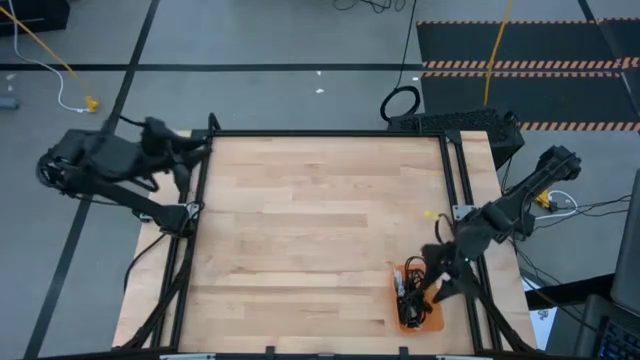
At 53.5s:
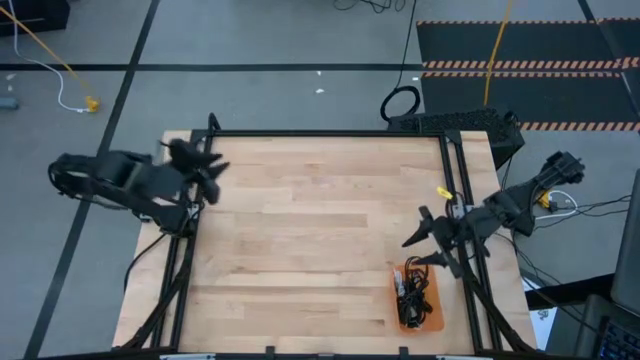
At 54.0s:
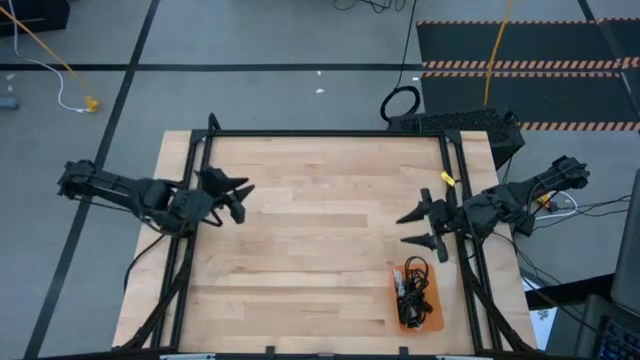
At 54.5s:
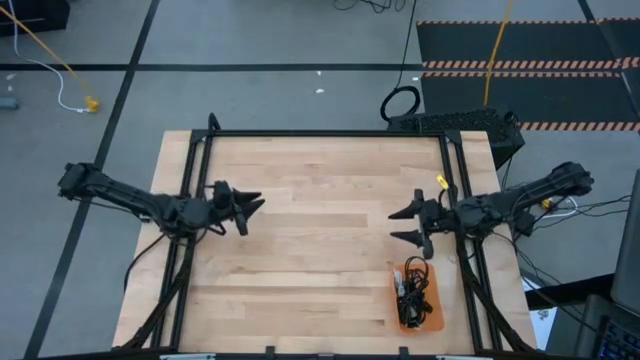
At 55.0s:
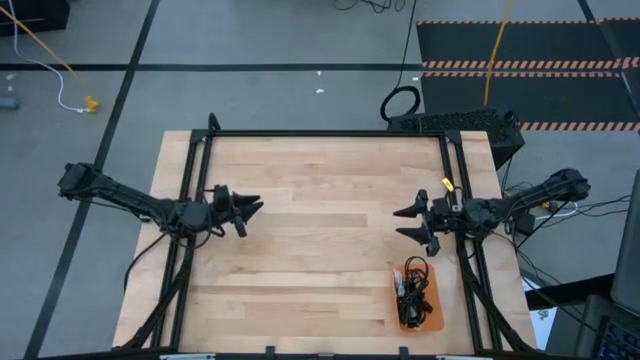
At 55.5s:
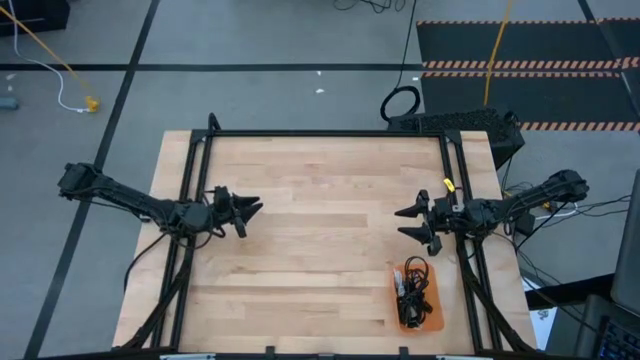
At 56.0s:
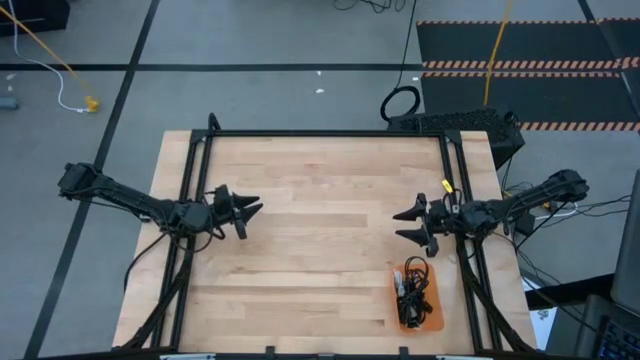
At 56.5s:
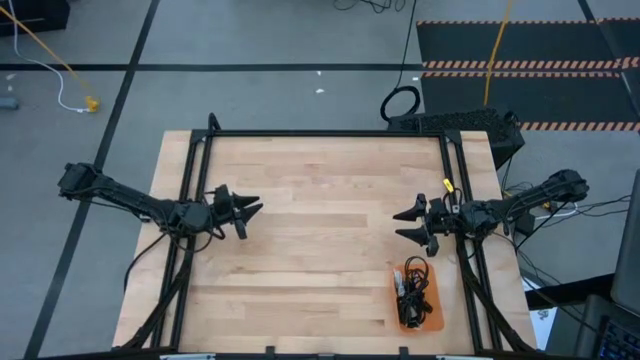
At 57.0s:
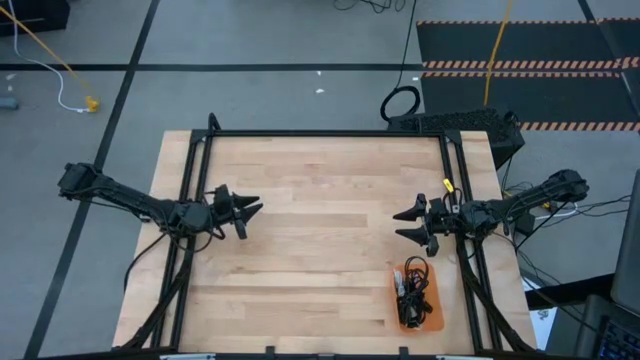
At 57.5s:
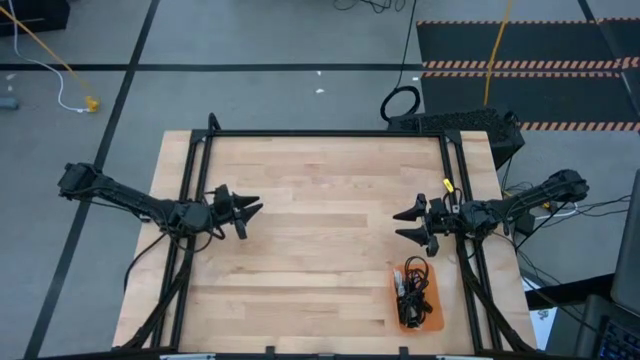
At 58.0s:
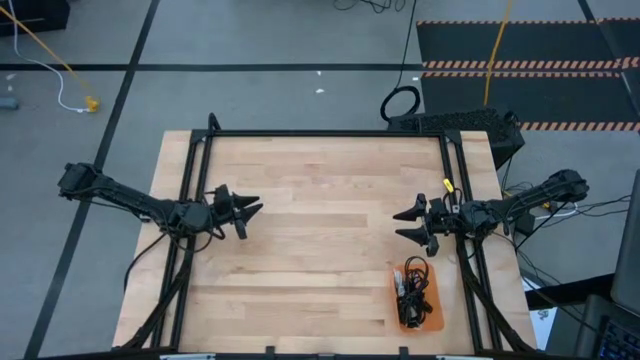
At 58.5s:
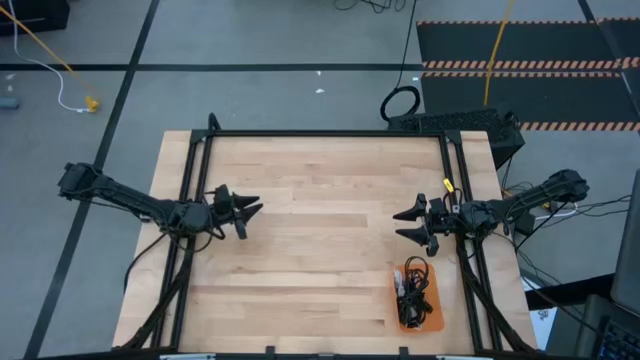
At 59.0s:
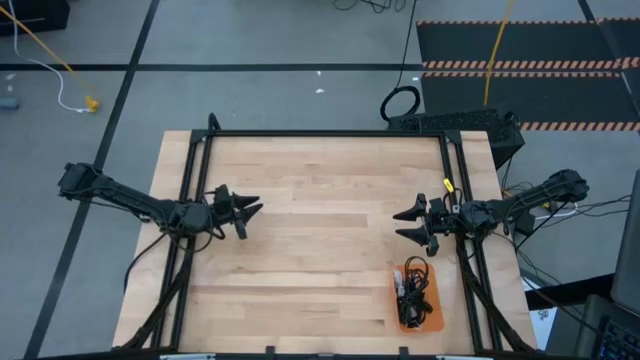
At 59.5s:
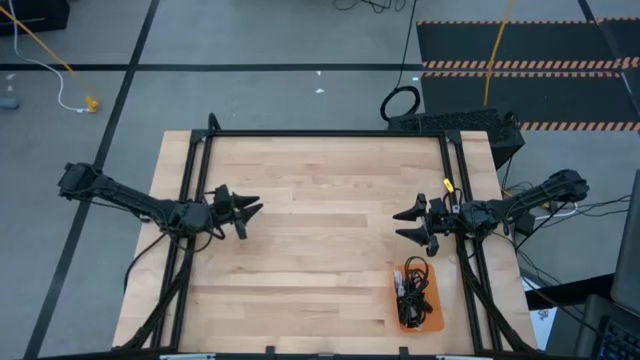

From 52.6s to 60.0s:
Task: Pick and place USB-C Cables
Return to home position

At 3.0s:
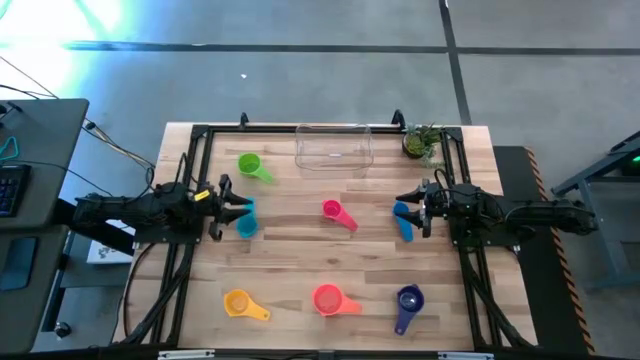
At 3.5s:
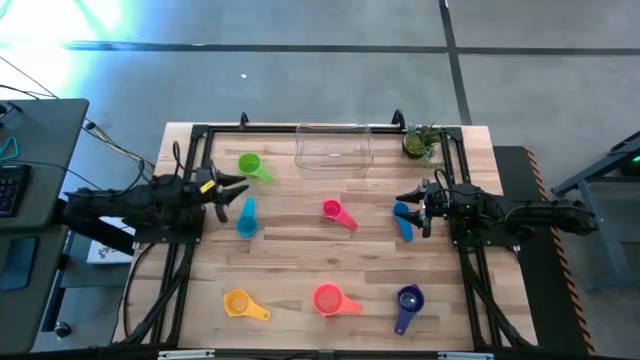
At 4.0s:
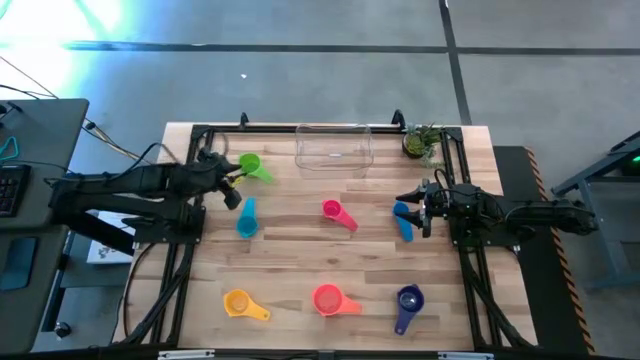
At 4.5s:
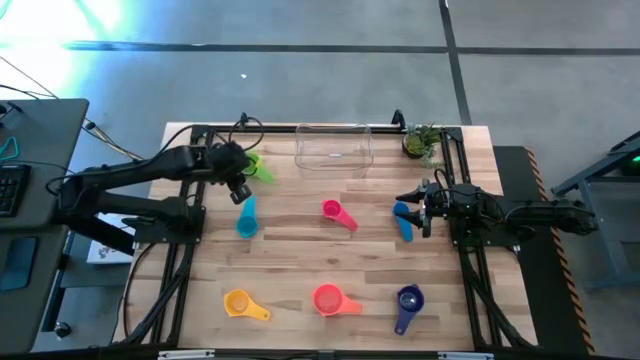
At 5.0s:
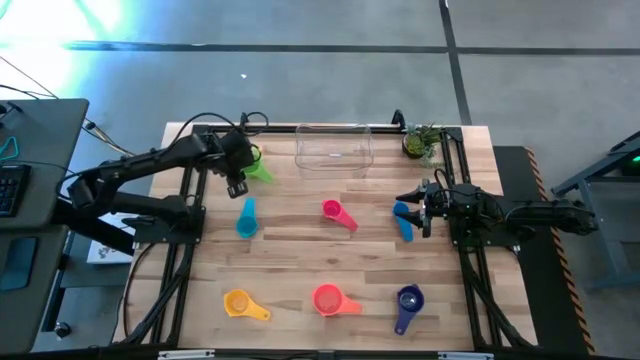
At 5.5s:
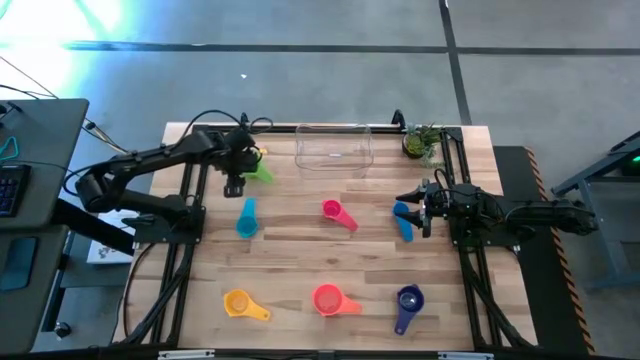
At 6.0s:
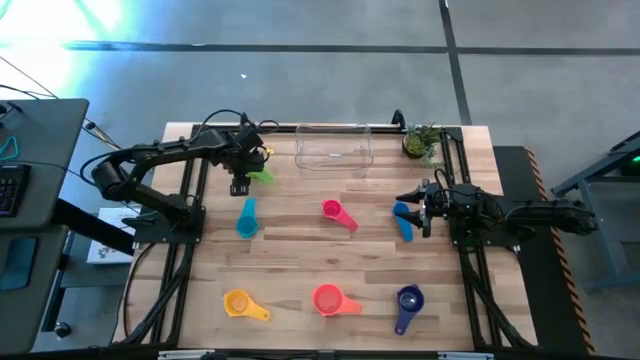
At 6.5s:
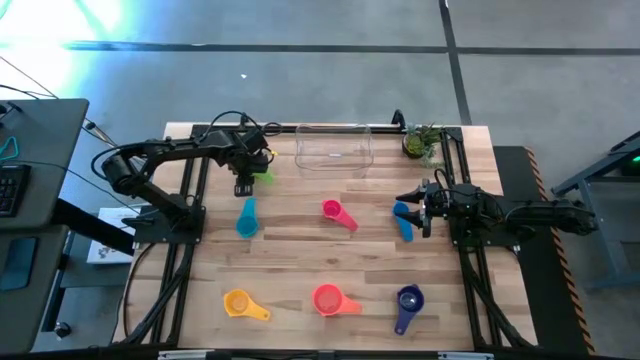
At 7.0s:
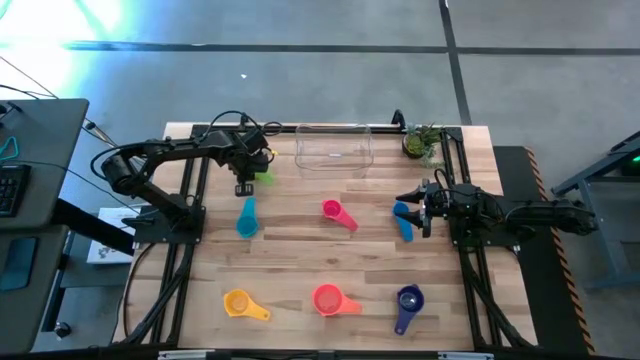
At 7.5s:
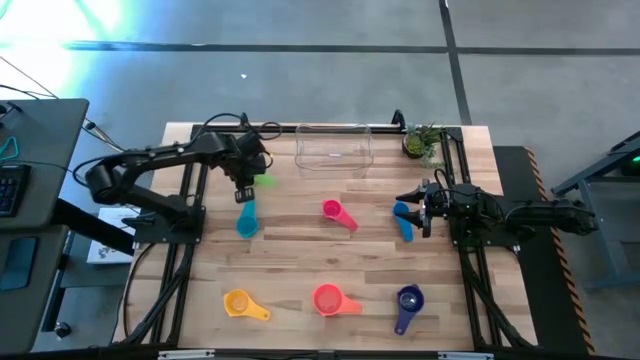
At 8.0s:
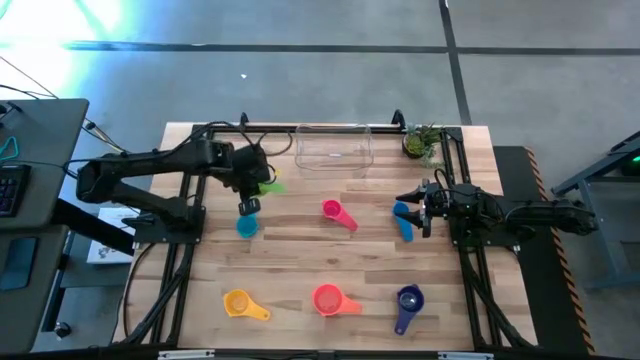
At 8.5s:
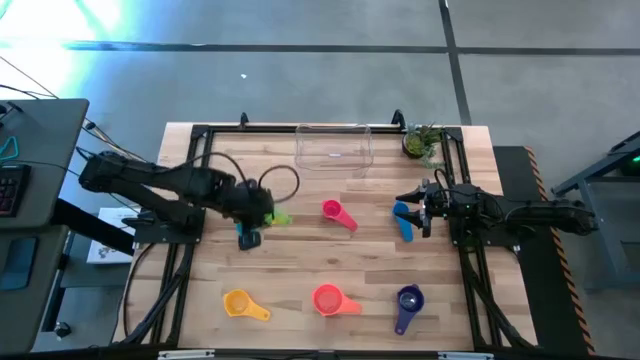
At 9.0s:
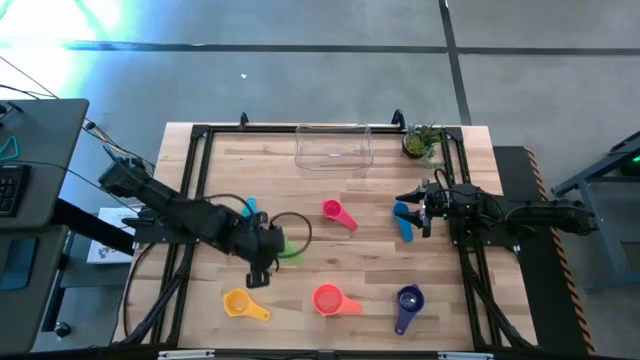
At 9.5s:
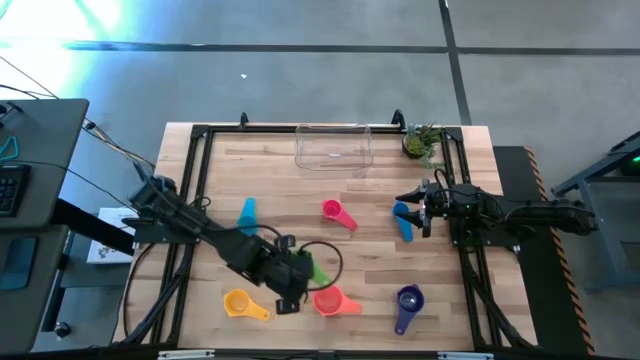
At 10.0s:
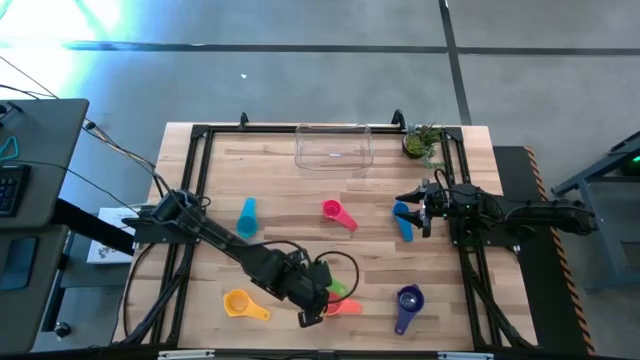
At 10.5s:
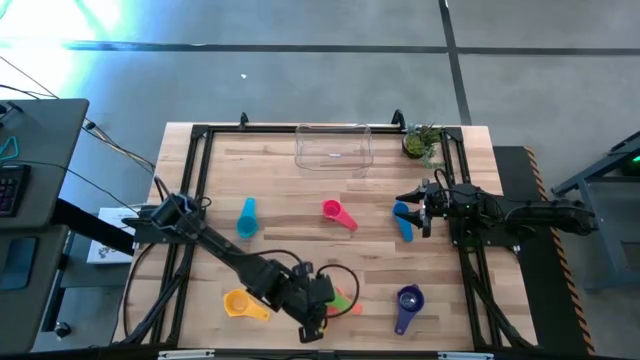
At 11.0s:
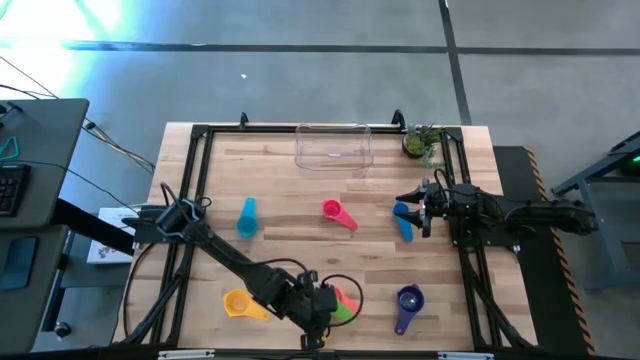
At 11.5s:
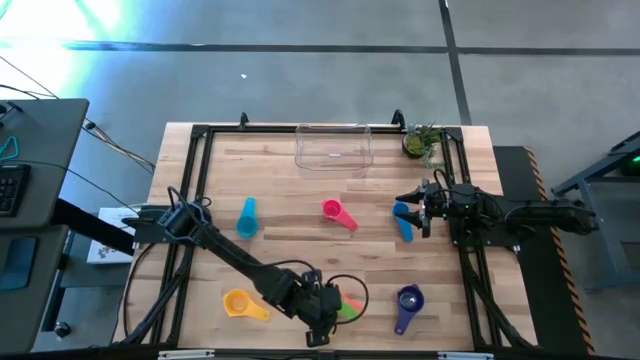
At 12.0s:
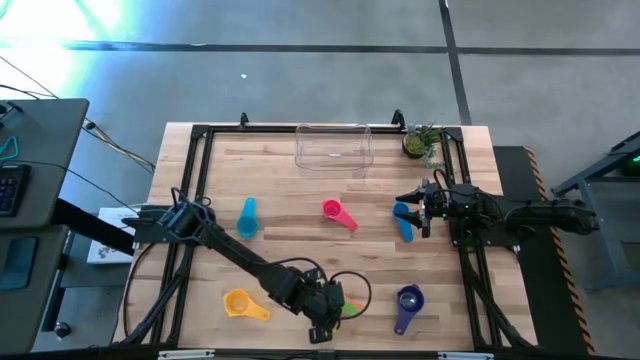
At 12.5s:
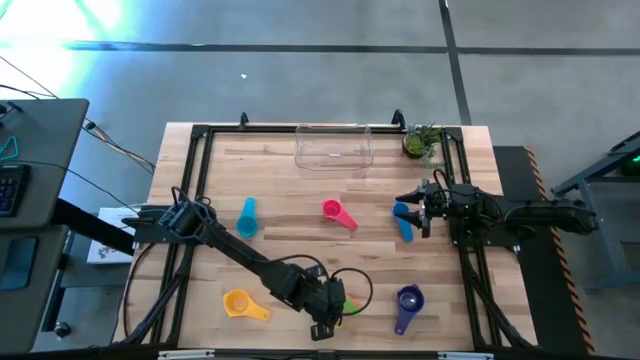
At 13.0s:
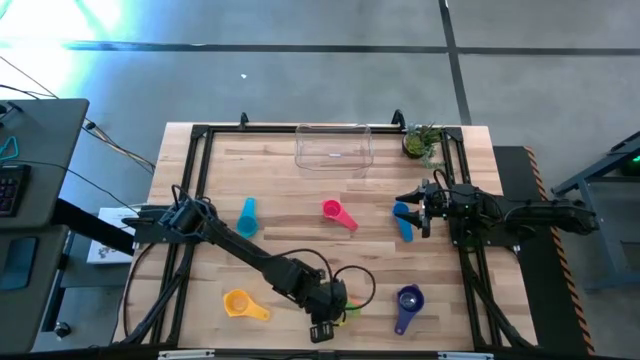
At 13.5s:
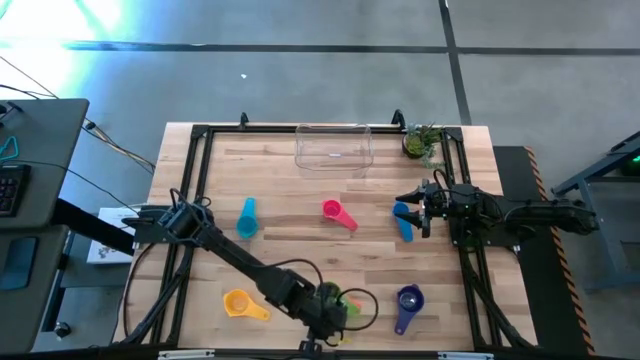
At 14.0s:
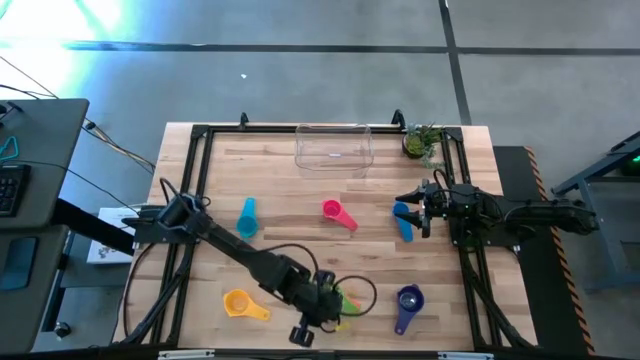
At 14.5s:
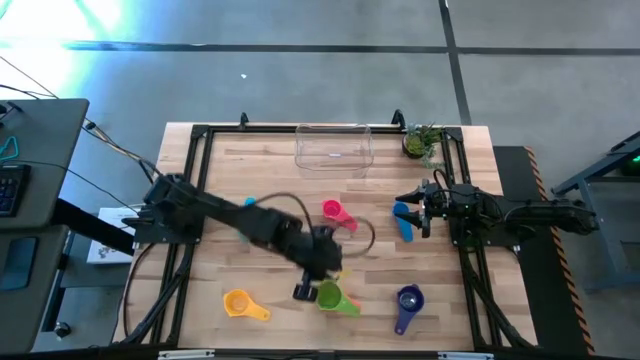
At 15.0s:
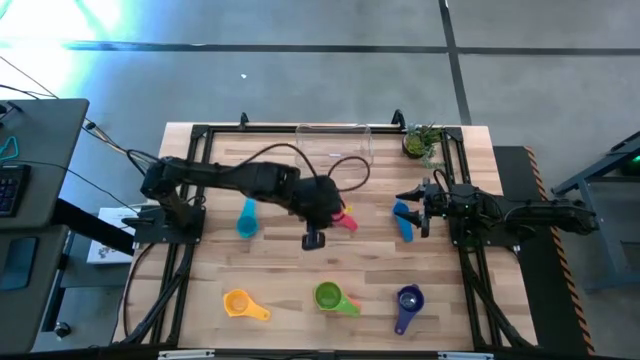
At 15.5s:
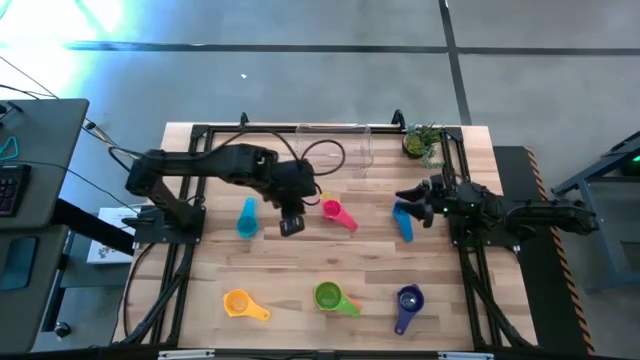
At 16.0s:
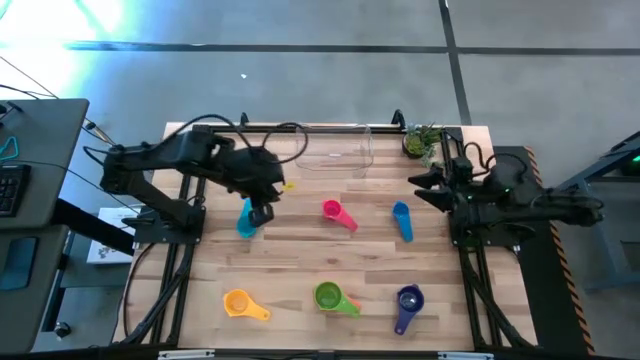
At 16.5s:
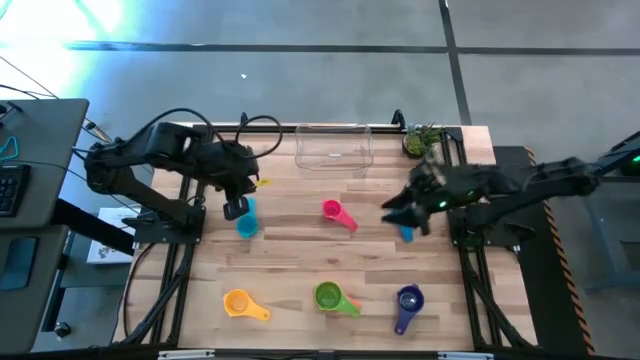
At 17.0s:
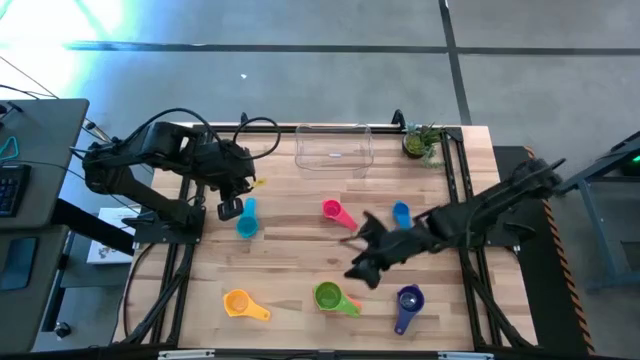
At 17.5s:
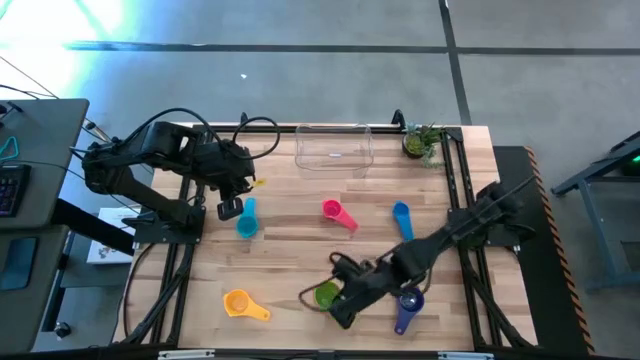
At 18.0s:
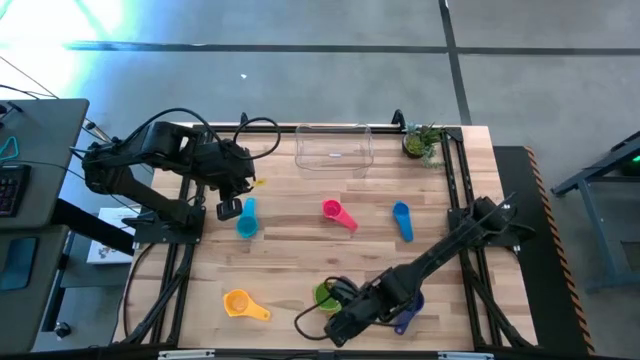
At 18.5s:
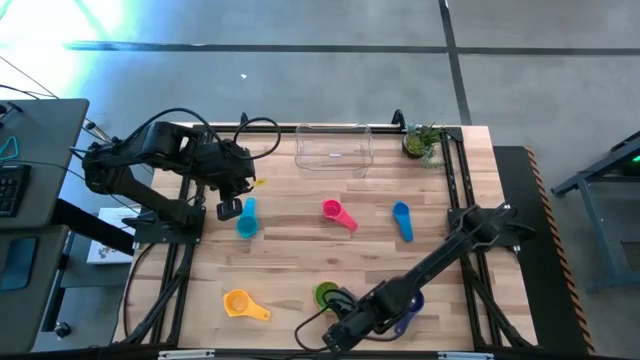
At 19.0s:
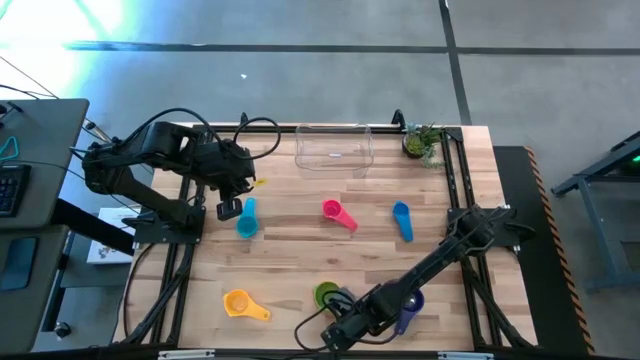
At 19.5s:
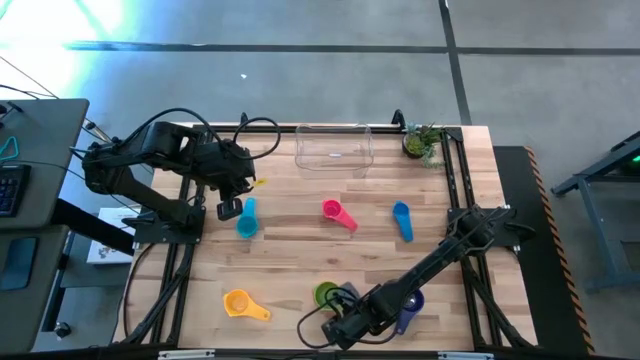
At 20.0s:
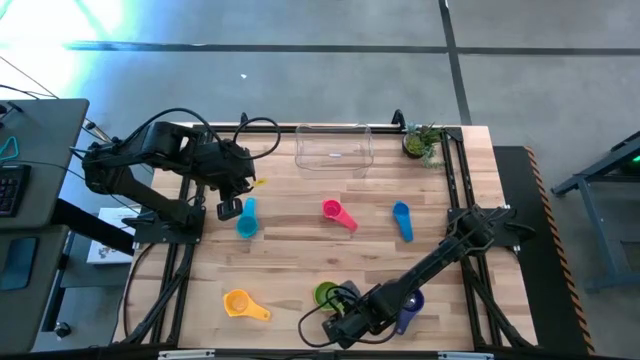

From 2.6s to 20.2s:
Task: Nest measuring cups in basket
Stack the green measuring cup on the orange measuring cup
